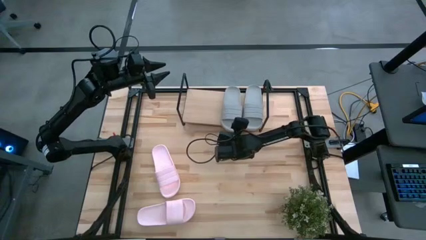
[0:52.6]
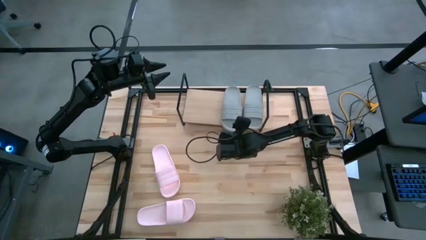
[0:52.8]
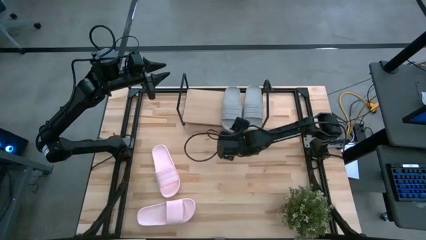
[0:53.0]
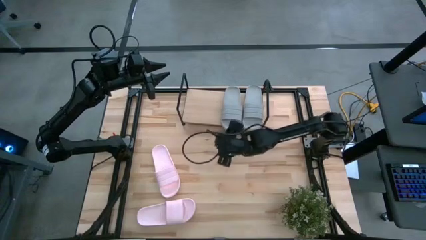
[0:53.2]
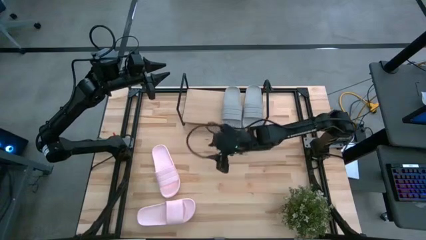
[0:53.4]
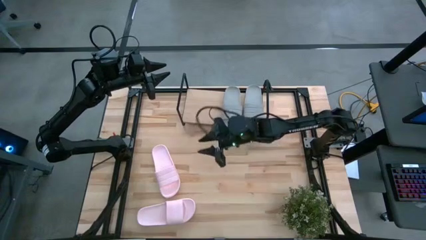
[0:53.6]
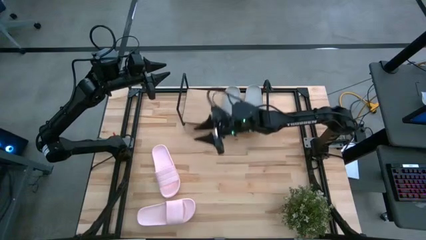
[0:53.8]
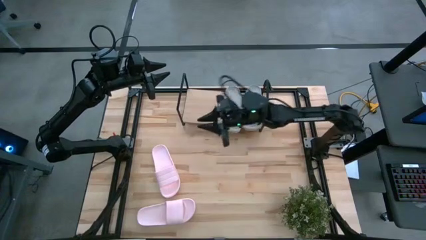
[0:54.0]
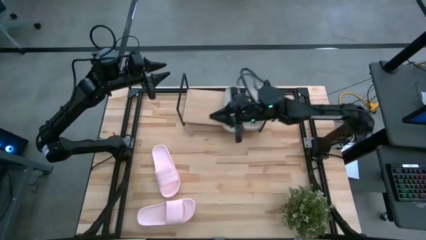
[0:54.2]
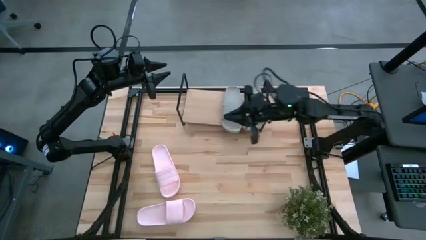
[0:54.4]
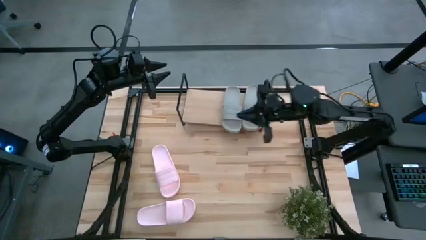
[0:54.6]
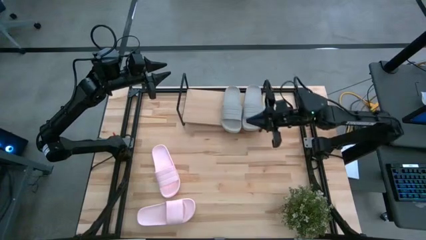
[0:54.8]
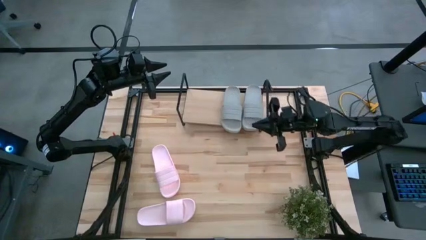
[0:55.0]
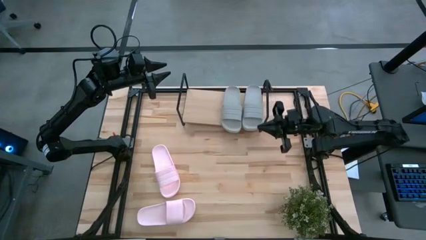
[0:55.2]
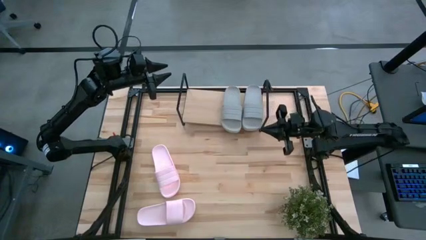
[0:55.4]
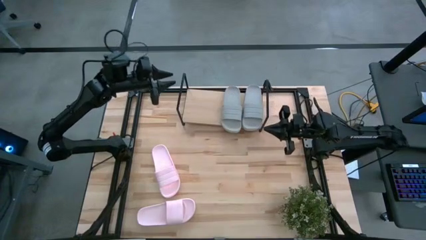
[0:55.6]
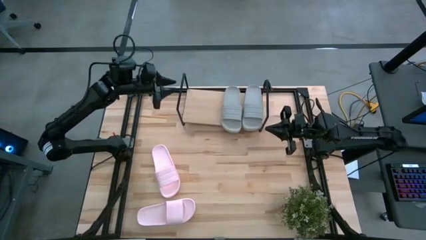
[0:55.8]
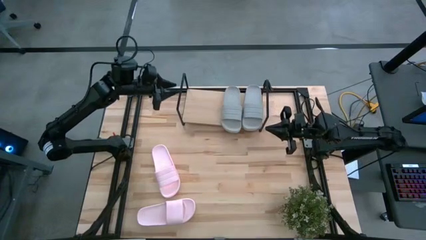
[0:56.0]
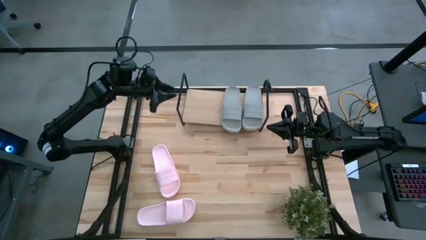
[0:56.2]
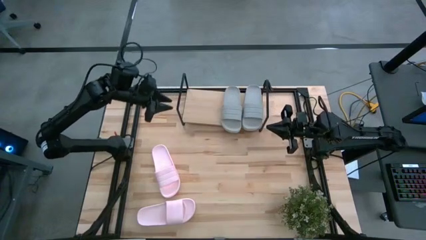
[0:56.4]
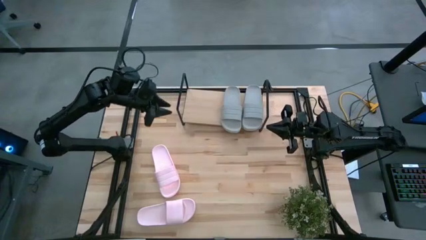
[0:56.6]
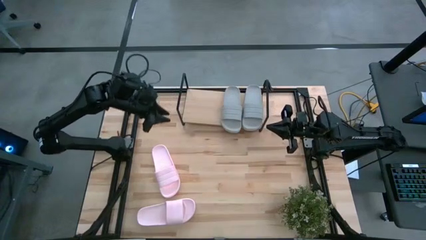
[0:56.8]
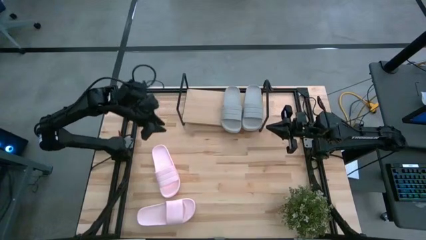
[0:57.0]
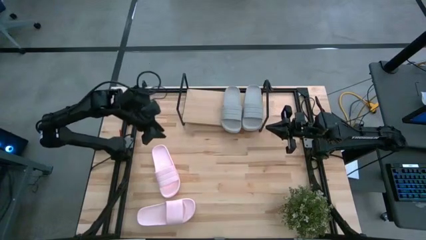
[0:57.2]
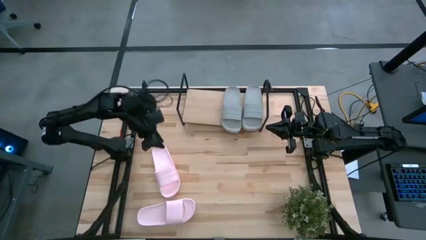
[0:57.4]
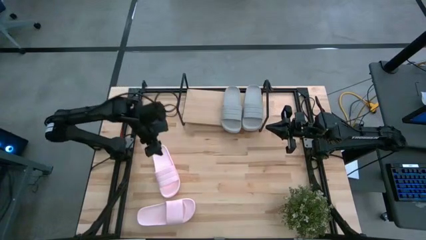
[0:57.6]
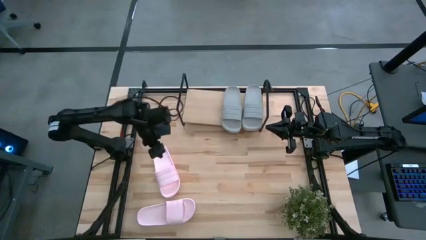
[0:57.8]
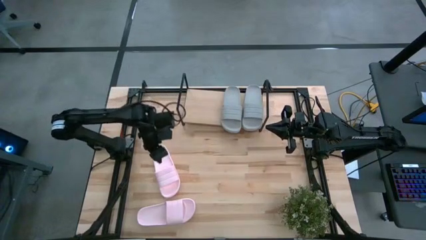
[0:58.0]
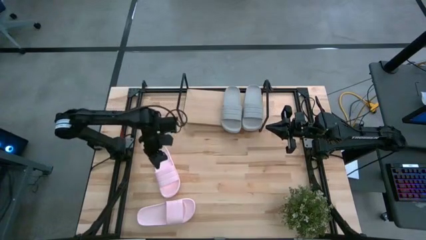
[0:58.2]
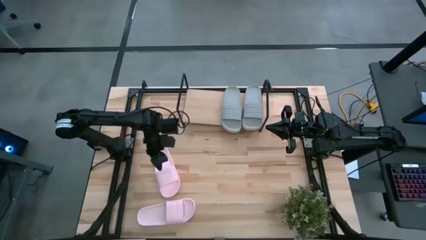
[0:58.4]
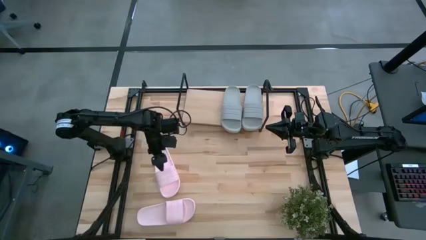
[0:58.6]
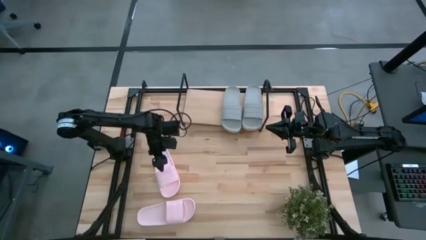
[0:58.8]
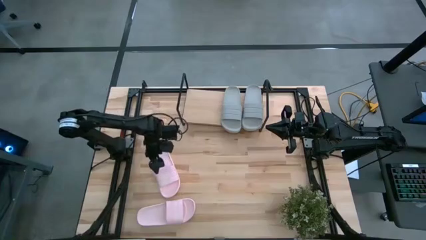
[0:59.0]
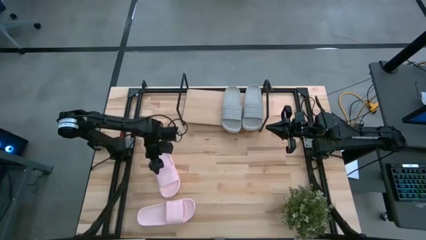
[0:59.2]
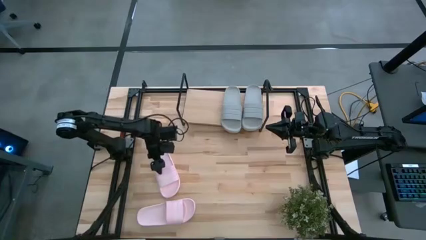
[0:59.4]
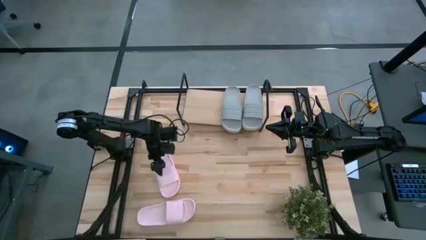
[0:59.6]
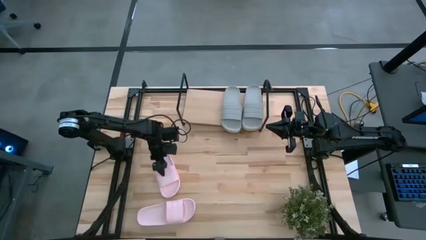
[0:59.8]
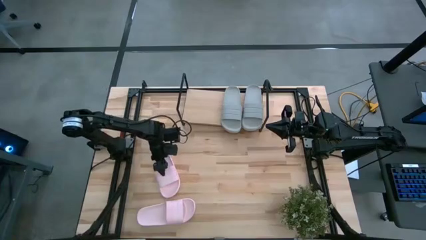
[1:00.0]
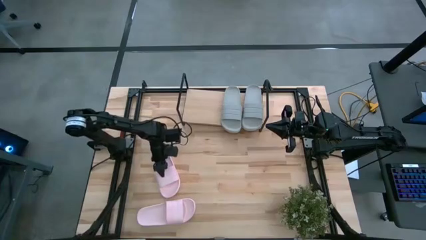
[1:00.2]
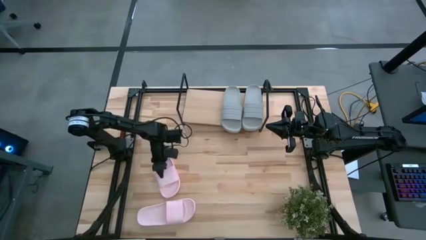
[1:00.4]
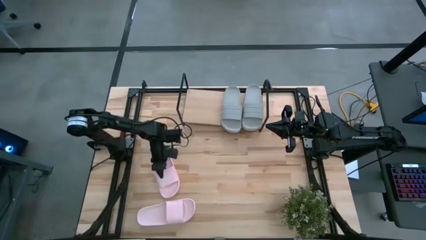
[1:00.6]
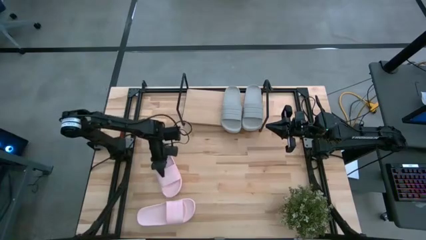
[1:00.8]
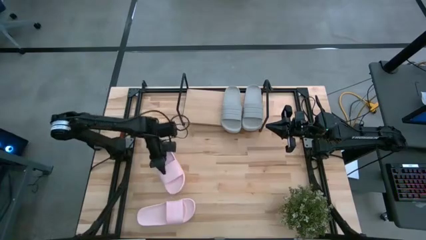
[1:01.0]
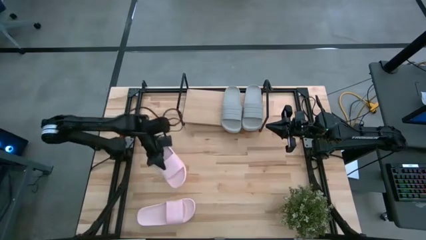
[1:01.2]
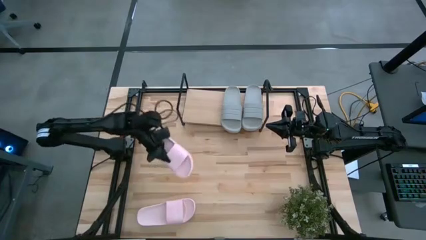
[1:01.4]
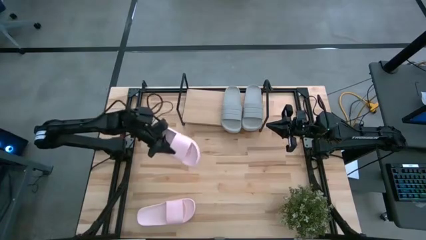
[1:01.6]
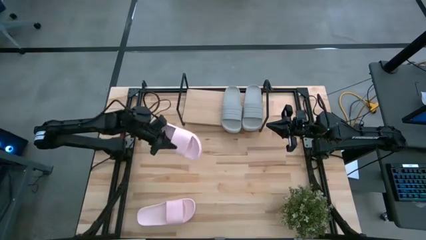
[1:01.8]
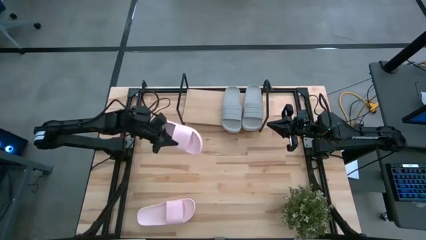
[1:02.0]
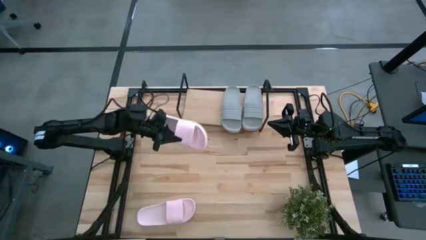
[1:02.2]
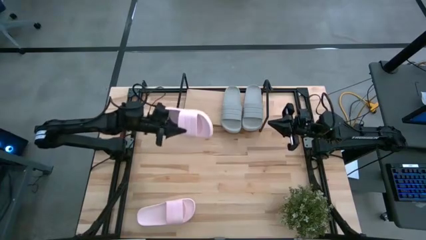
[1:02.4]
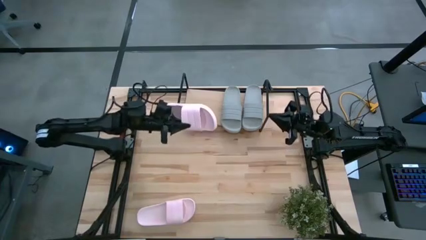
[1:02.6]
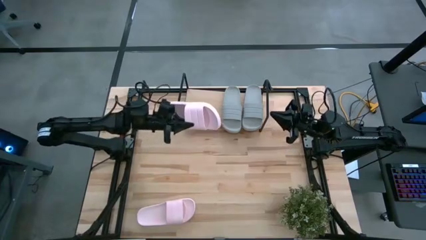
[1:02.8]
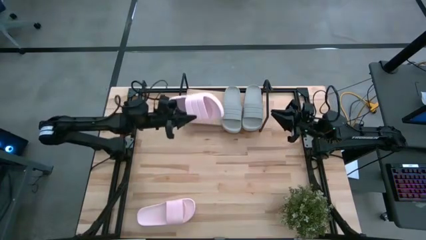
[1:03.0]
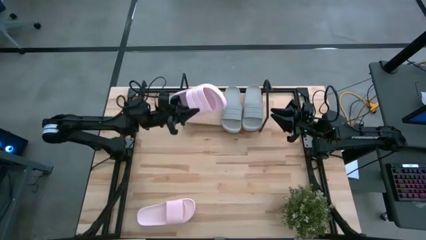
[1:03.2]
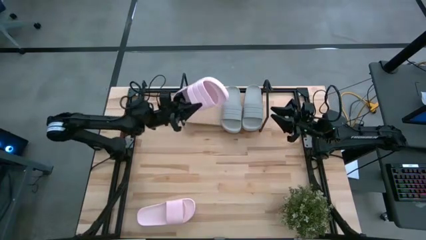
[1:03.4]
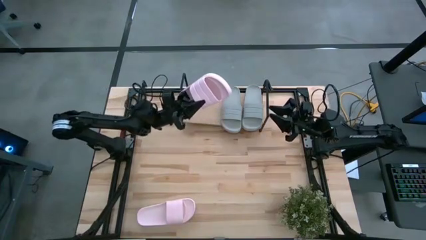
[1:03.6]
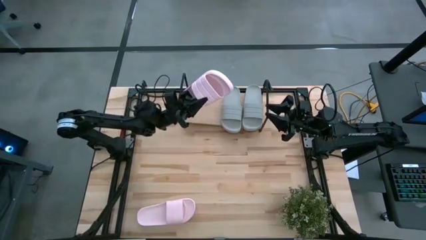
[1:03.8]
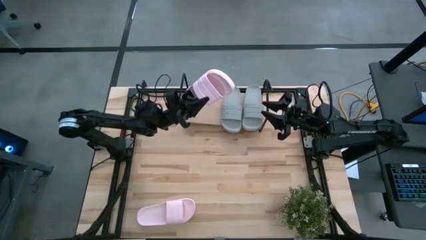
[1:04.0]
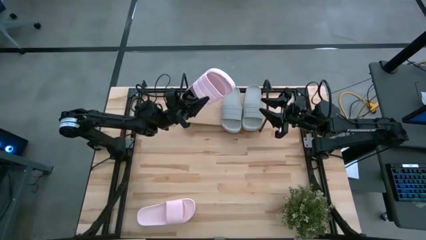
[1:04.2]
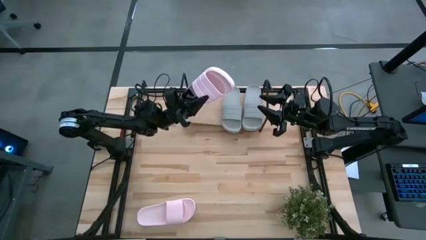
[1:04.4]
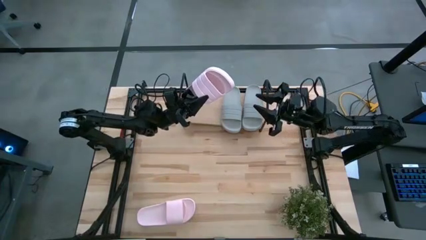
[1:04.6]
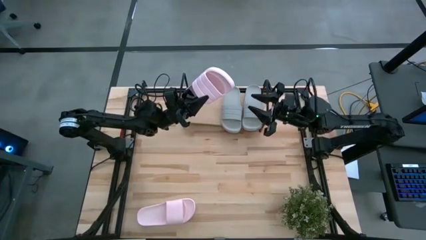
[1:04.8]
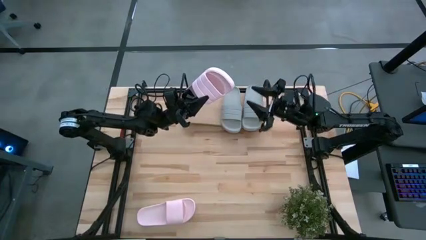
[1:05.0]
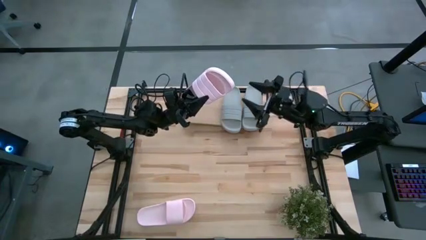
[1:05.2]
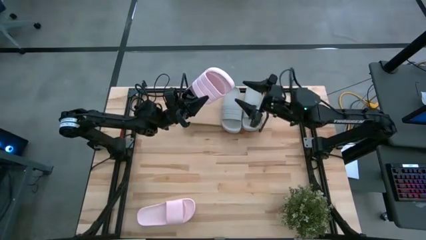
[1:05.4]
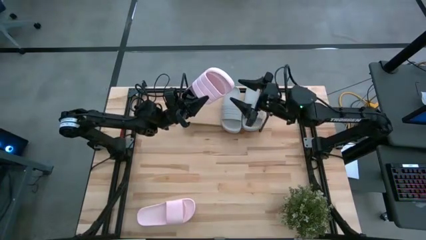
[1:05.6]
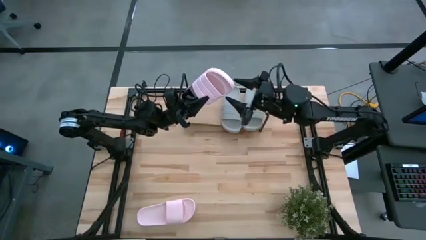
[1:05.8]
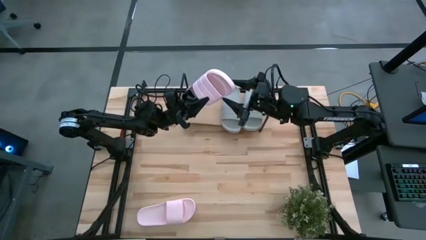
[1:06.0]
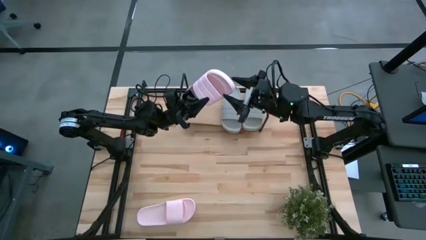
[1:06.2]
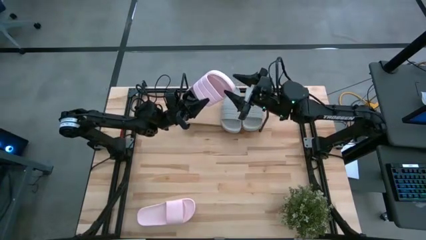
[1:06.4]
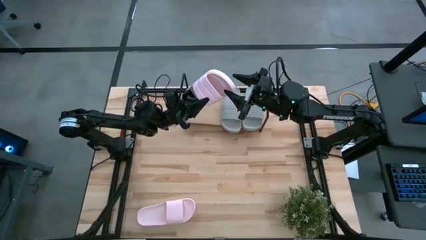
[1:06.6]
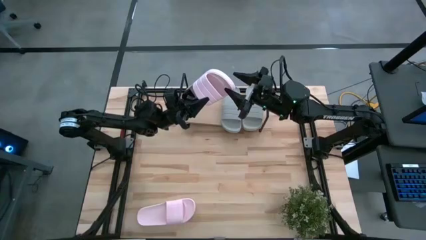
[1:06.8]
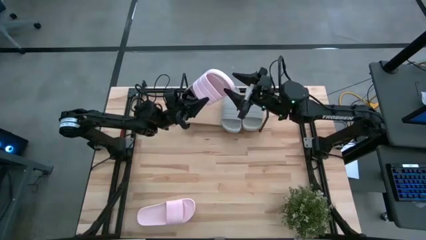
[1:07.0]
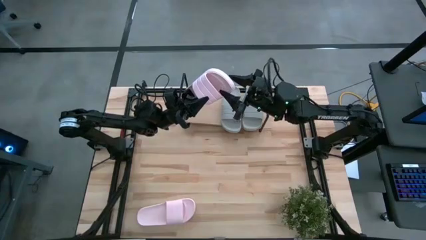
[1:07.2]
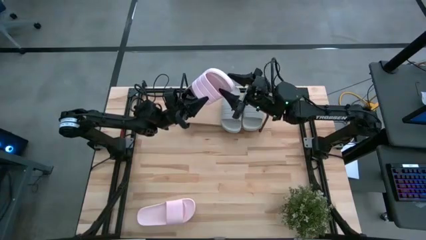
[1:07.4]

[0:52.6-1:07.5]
Task: Pick and place slides into the shelf
Put the top pink slipper on the shelf

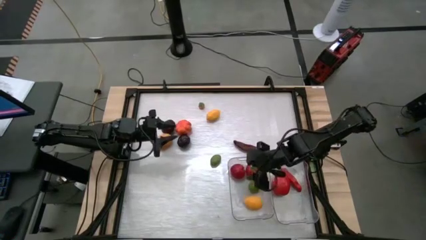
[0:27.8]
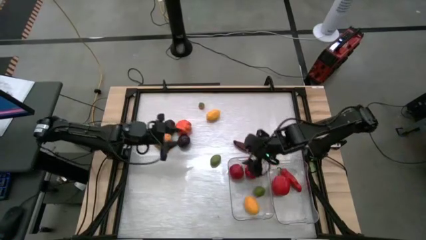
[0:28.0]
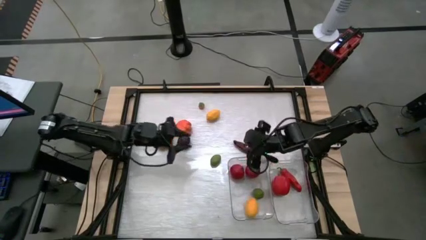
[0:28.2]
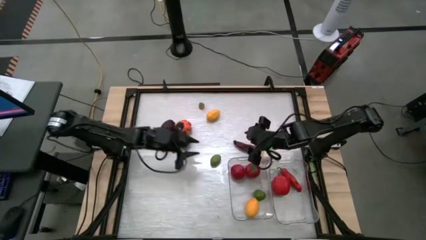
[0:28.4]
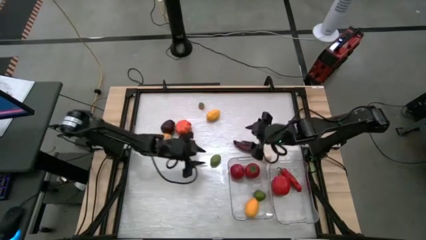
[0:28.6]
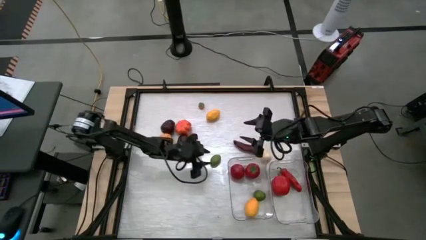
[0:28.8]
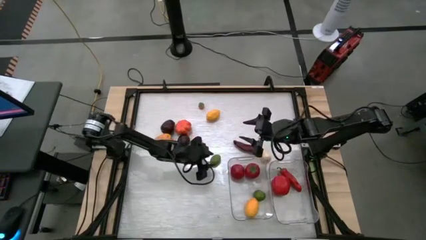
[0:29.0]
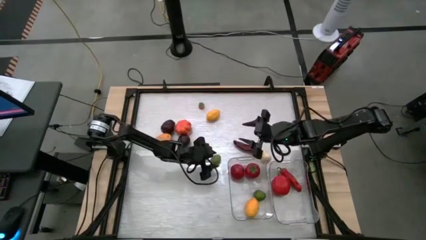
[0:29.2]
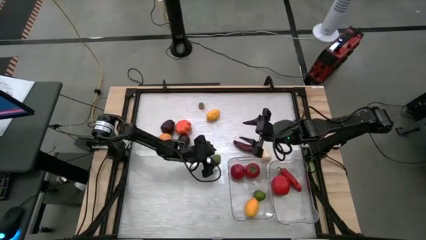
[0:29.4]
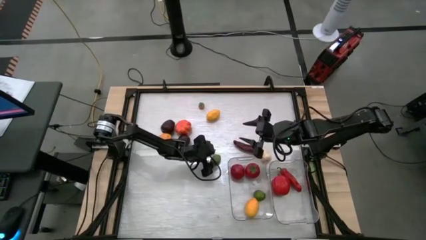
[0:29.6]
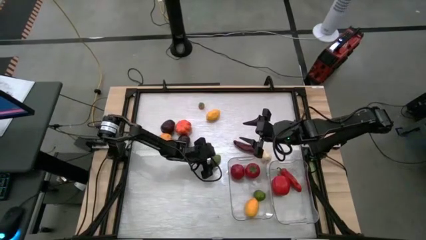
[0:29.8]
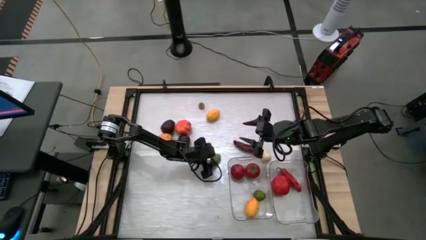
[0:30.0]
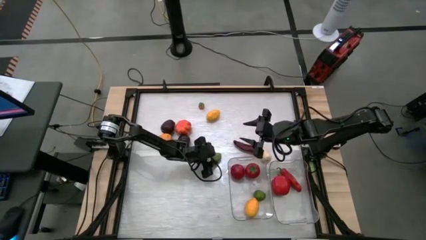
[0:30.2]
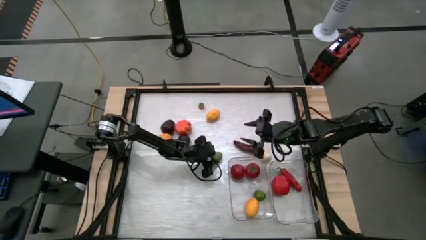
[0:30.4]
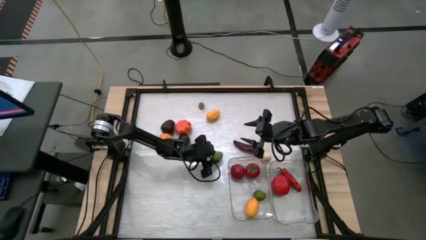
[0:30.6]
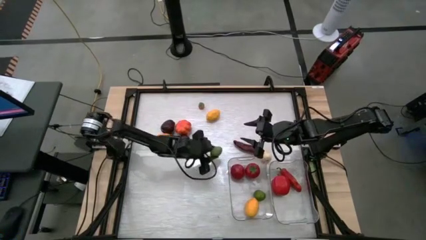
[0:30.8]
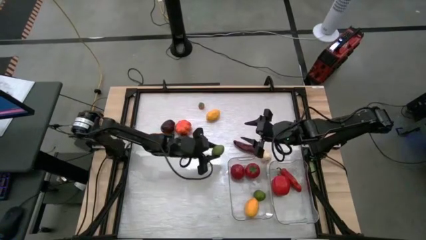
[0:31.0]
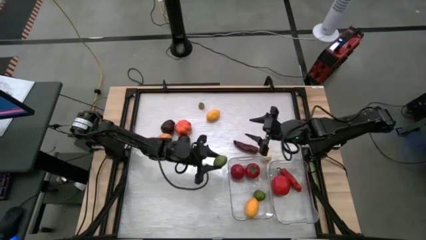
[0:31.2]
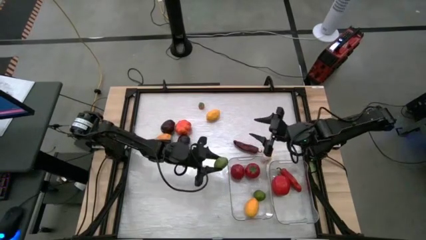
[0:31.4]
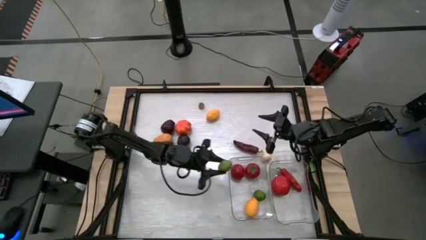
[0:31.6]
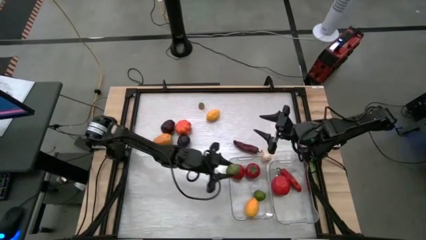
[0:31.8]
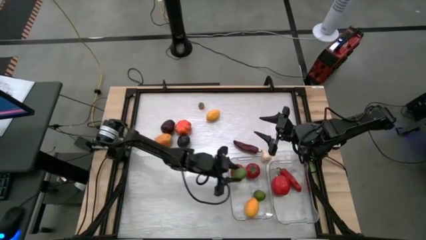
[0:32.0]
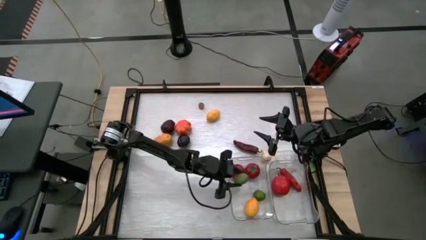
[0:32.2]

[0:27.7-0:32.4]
Task: Sort produce into baskets
Put the lime into the left transparent bin
